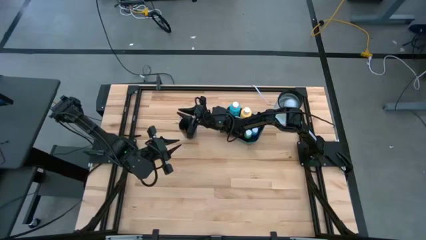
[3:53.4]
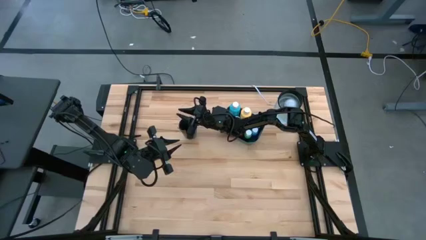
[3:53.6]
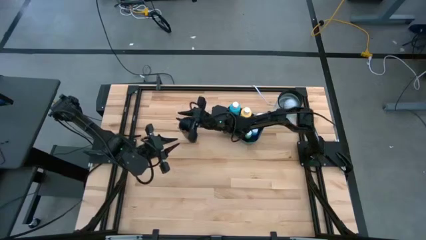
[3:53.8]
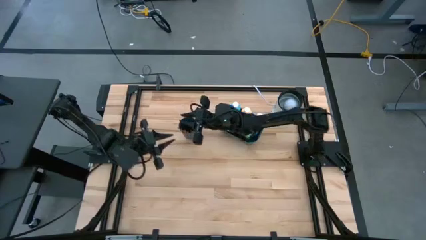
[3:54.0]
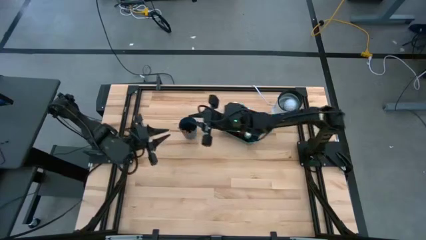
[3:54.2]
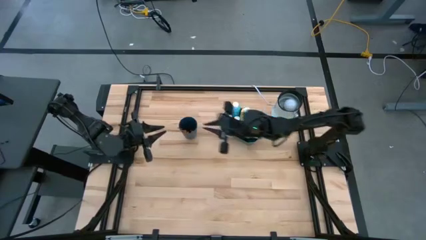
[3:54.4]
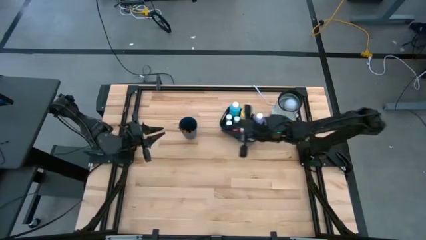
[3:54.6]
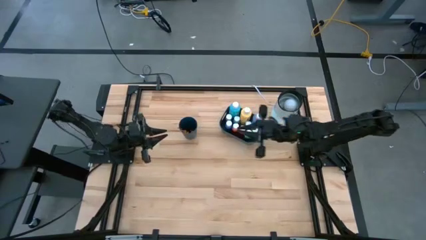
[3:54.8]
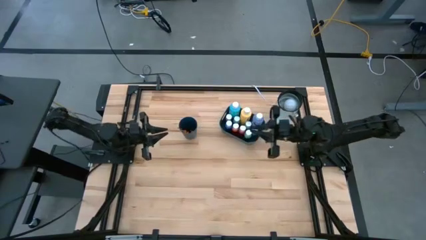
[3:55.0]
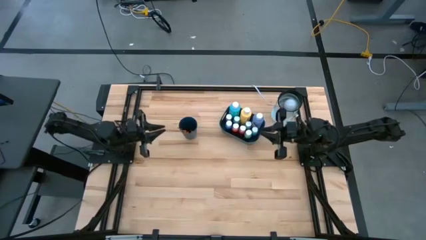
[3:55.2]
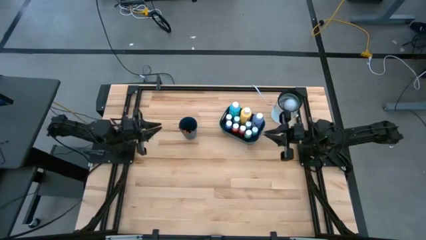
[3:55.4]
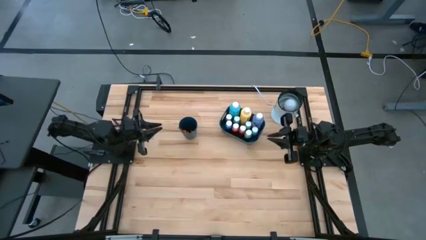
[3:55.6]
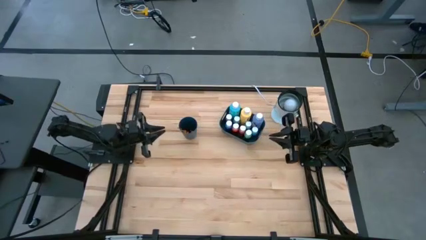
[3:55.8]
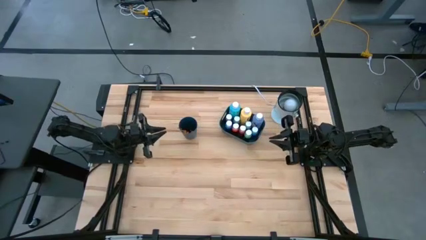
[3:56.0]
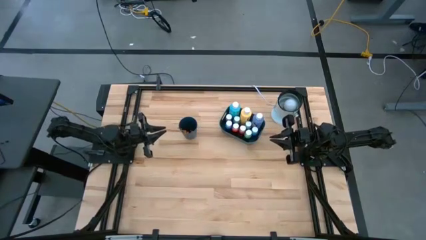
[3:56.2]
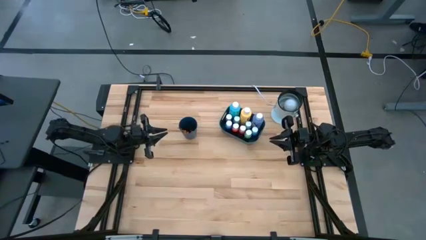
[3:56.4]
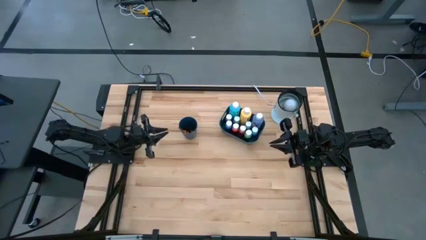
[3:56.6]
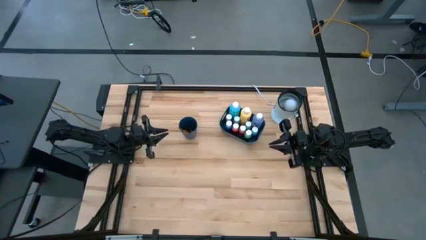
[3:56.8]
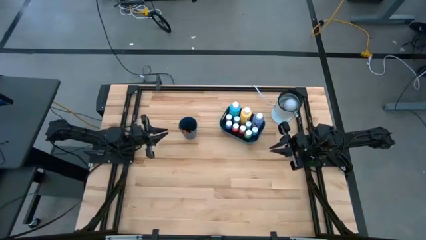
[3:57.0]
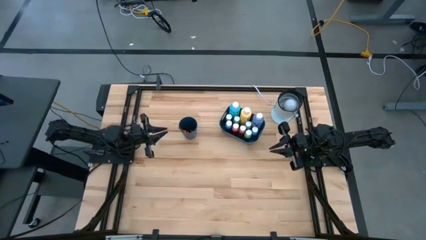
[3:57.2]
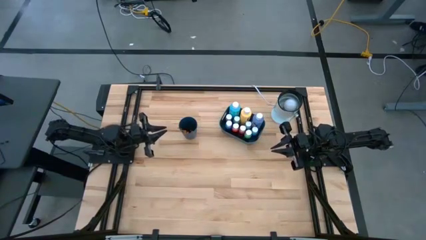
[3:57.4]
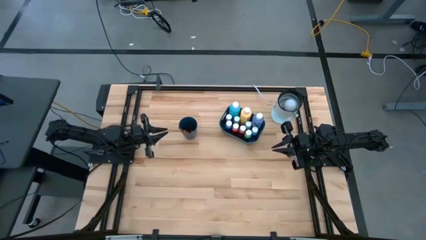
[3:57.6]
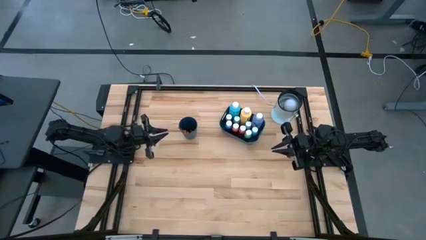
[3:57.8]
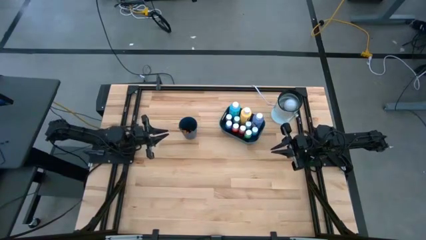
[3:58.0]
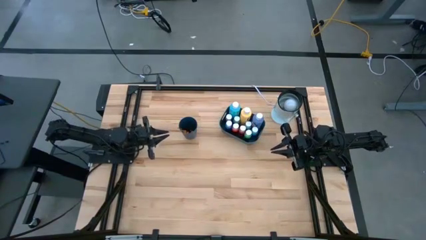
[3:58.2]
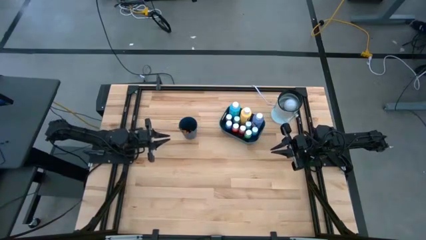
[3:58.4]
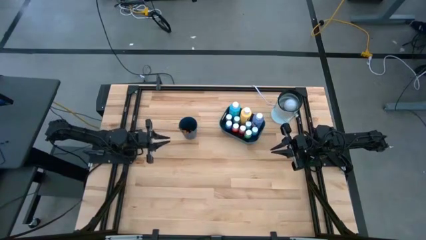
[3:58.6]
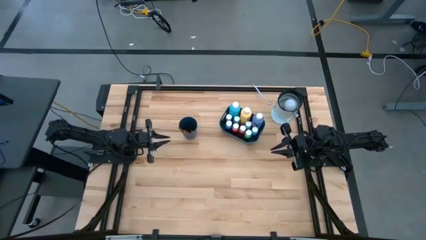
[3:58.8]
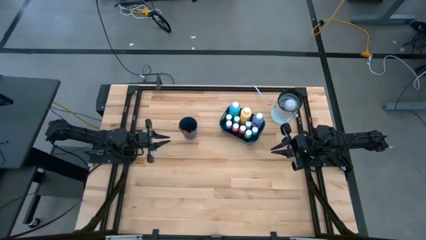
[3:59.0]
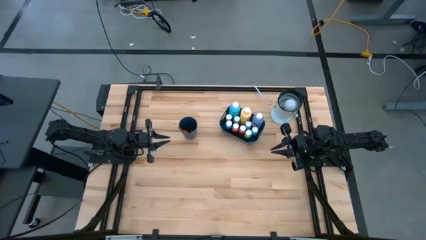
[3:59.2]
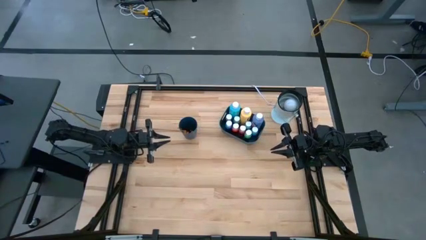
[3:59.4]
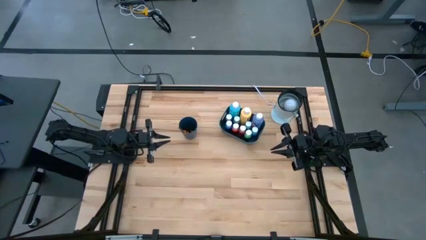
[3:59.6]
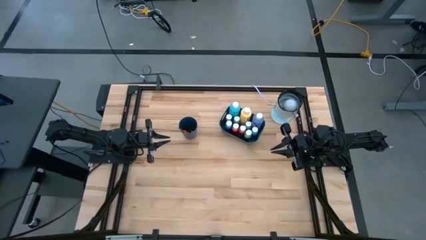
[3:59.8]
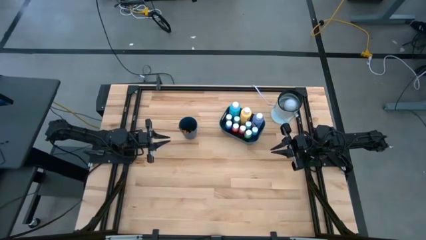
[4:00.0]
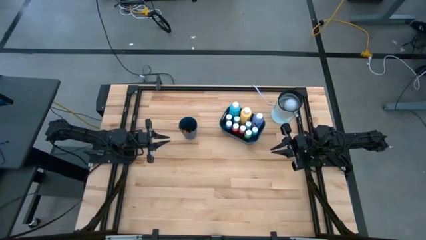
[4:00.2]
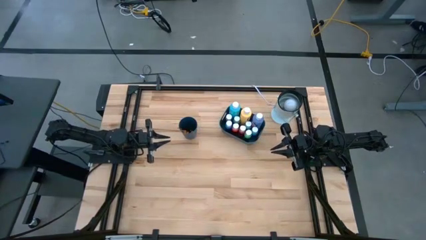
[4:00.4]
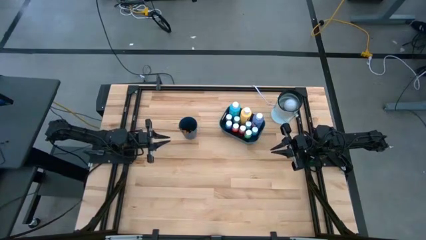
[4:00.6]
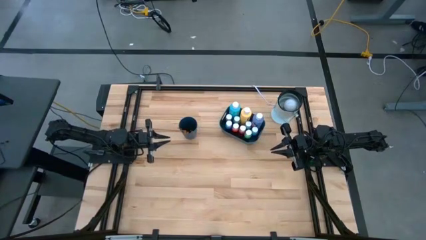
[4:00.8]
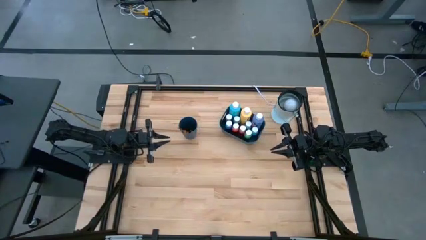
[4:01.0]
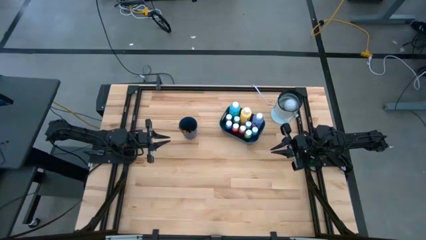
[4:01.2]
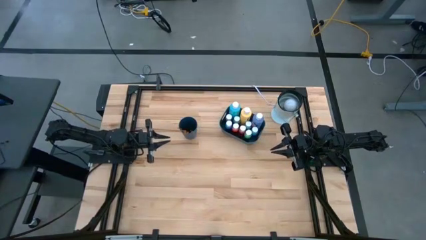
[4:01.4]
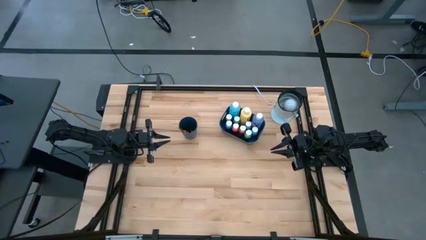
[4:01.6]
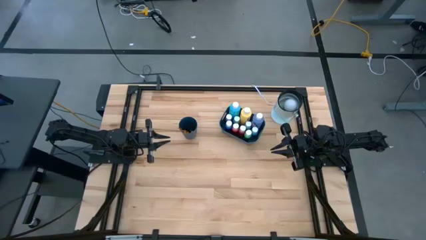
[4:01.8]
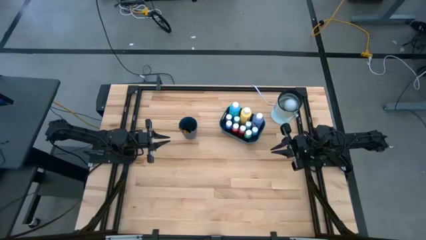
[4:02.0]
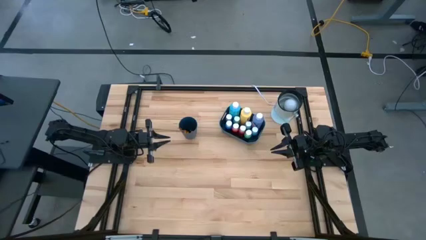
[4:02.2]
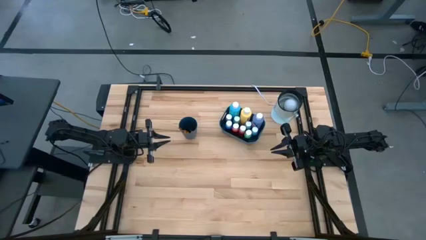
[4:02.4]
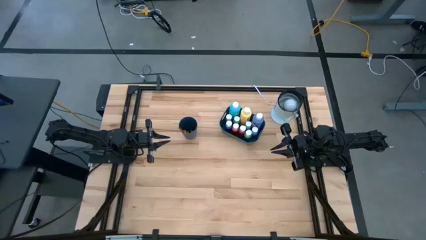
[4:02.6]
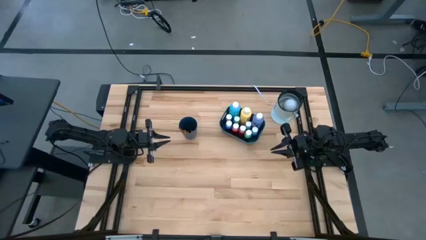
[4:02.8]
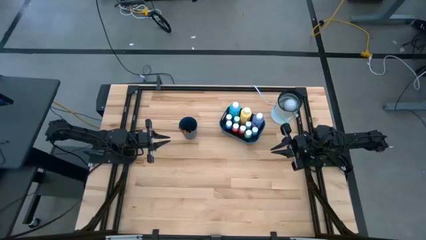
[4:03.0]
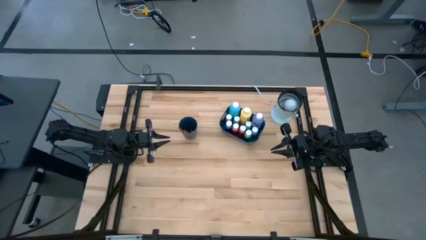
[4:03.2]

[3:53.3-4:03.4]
Task: Pick & Place Paint Supplies
Return to Home Position

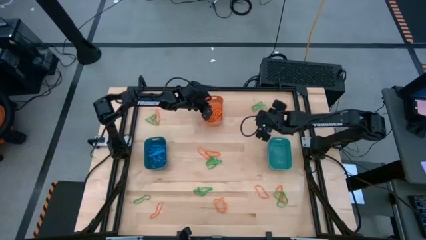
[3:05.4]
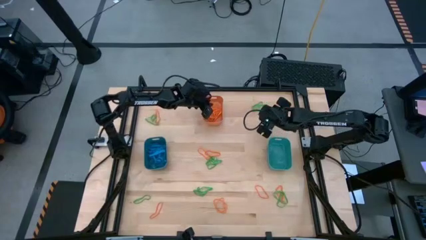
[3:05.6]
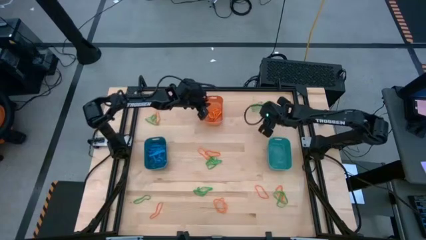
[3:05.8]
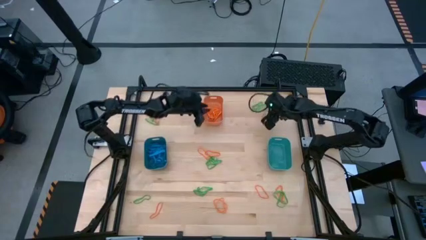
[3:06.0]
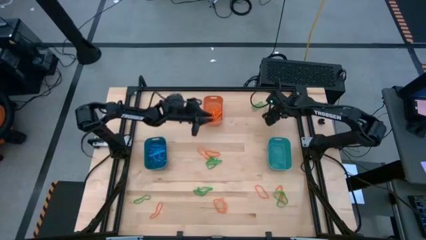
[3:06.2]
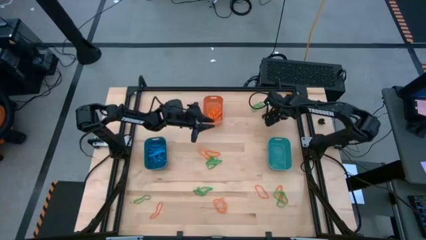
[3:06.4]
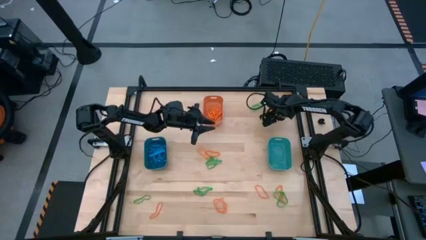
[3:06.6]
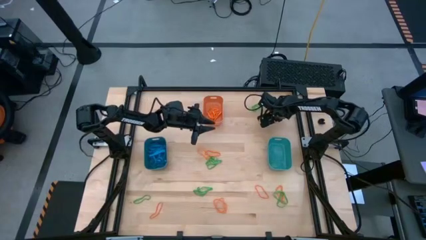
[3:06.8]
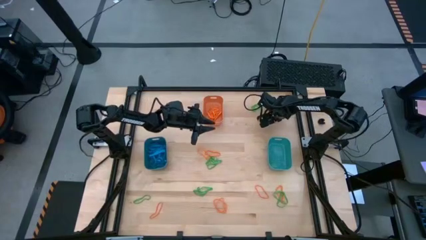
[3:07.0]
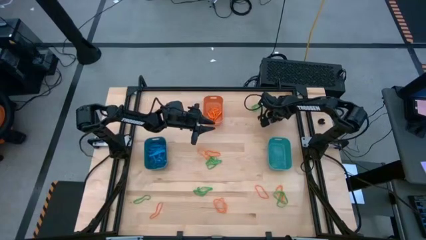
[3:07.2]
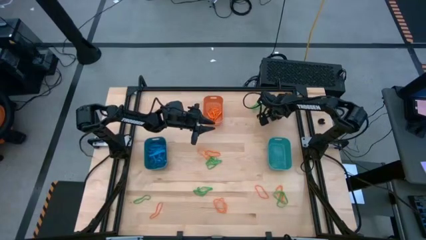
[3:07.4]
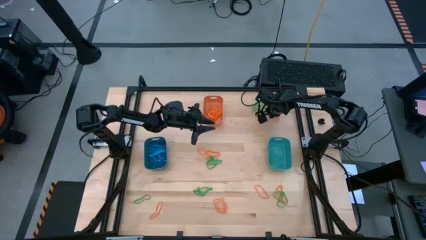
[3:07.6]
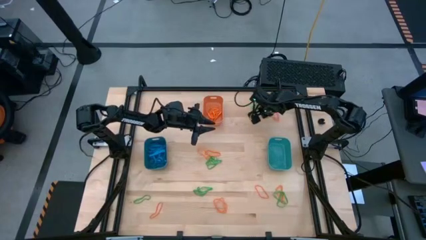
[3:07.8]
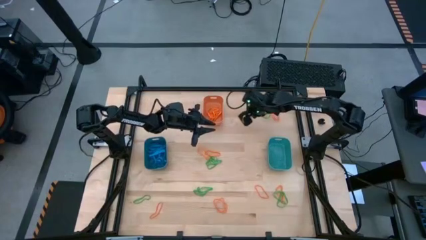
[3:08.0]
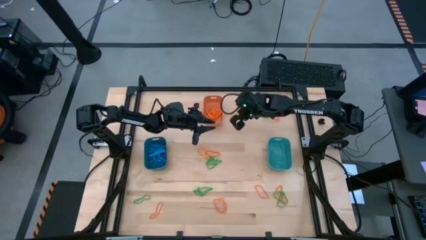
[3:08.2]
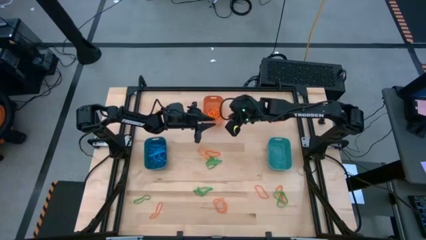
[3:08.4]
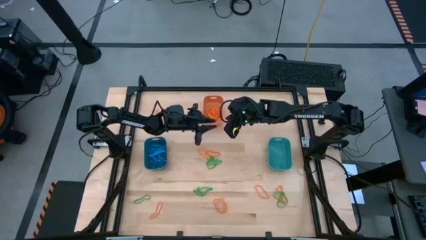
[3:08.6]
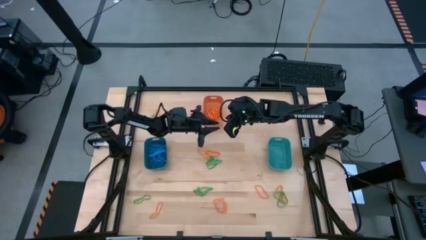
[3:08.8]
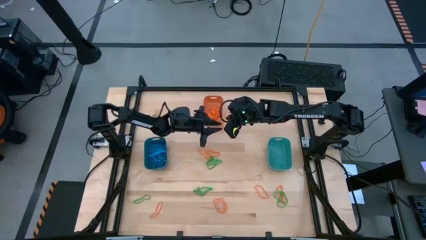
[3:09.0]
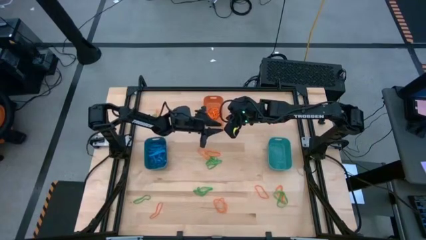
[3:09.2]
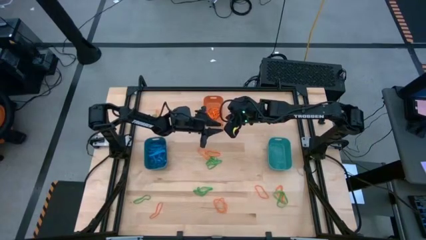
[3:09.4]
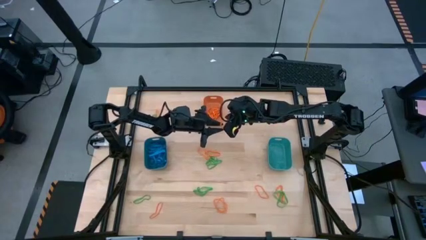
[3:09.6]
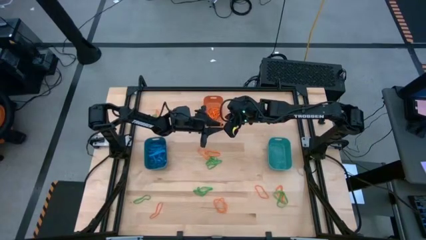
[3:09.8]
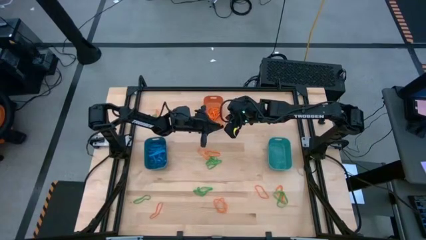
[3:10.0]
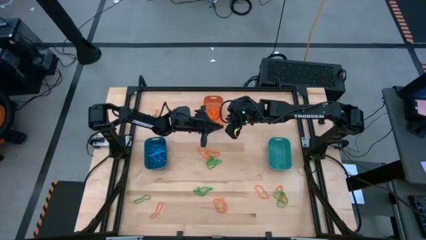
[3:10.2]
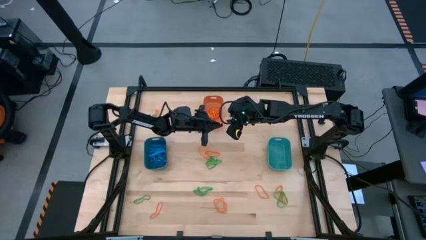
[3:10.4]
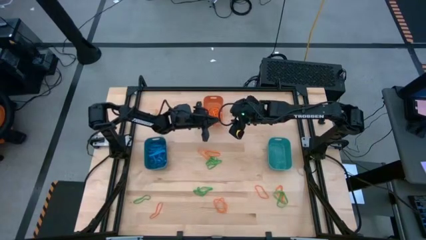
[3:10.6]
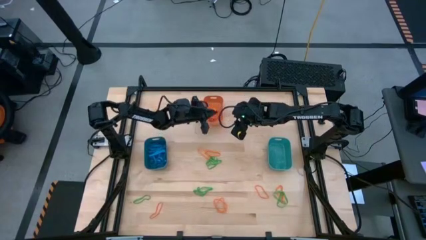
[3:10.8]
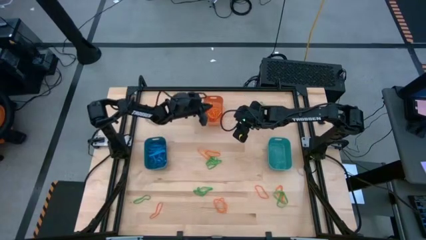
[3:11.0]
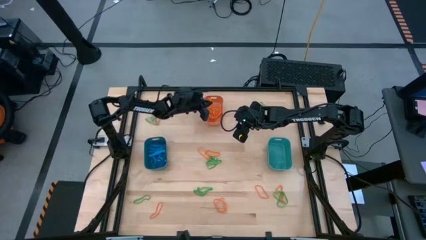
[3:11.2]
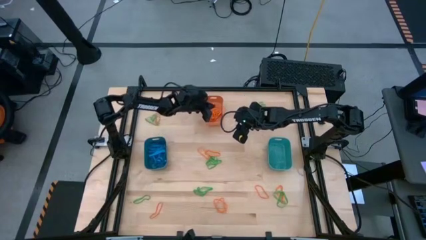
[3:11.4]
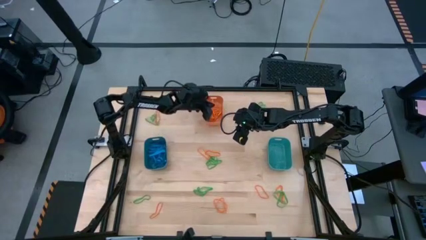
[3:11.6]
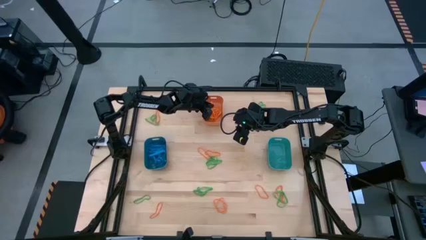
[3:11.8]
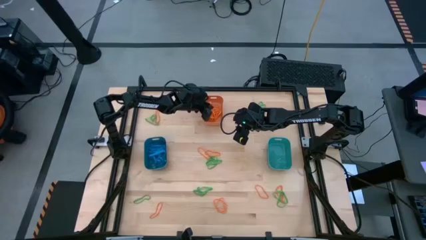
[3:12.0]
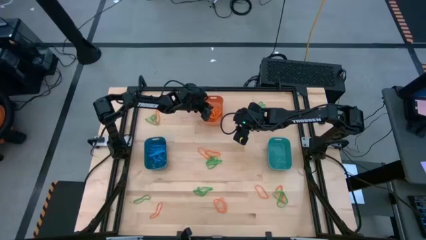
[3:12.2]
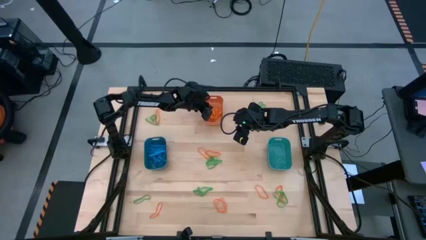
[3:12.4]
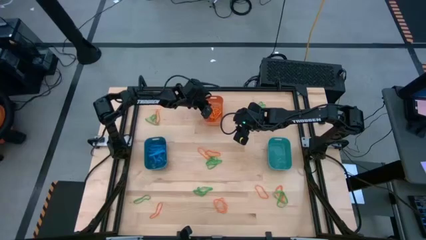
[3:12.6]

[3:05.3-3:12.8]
Task: Sort rubber bands into baskets
Put the orange rubber band into the orange bin
